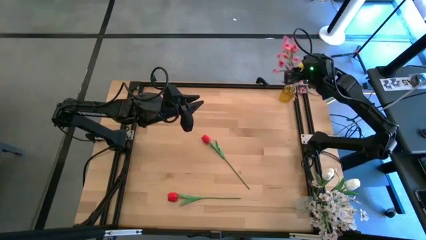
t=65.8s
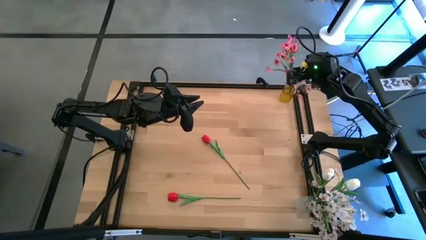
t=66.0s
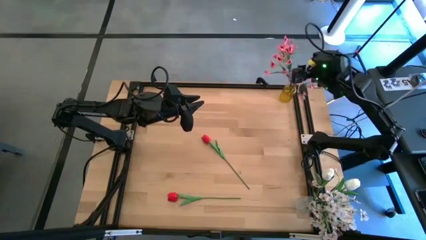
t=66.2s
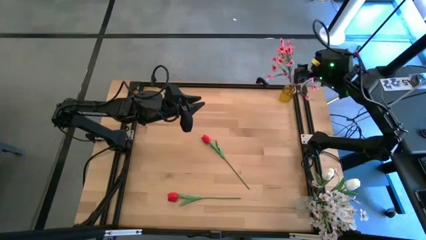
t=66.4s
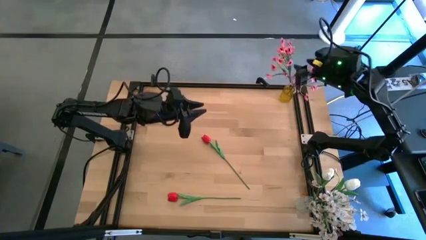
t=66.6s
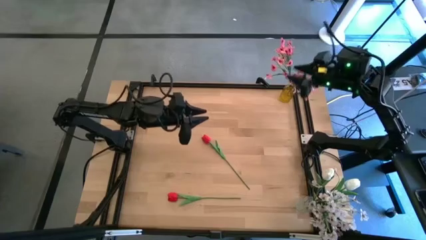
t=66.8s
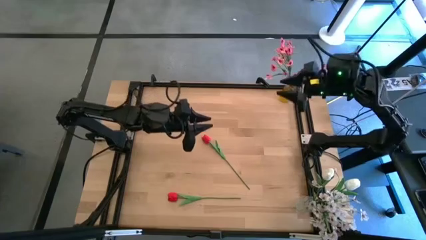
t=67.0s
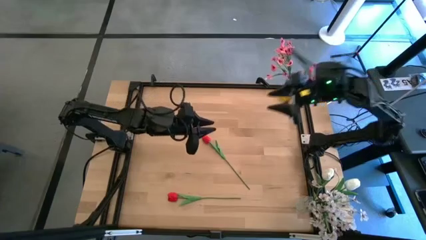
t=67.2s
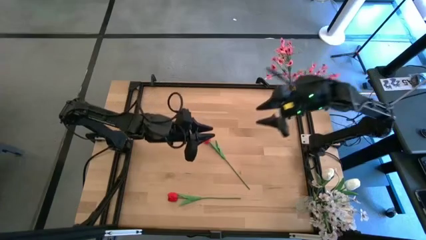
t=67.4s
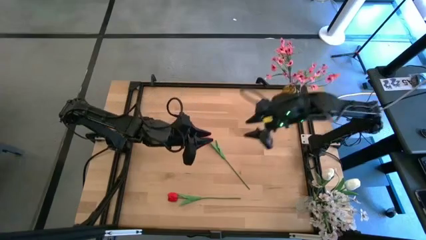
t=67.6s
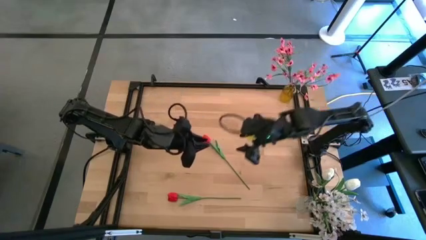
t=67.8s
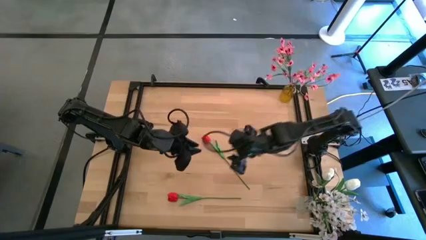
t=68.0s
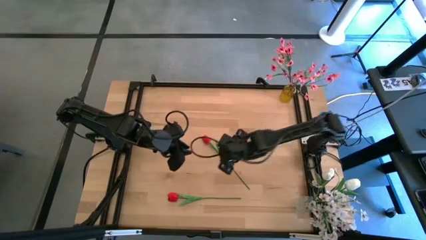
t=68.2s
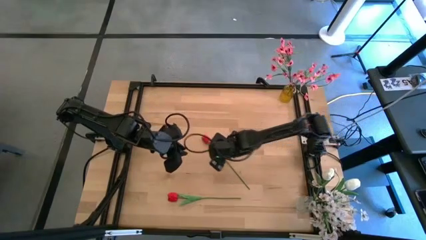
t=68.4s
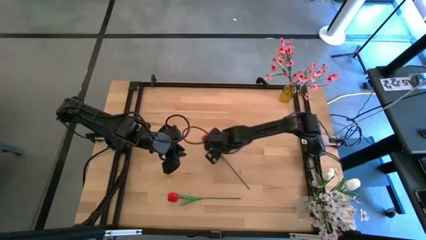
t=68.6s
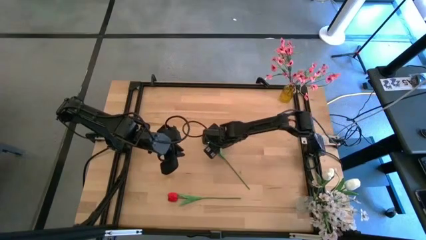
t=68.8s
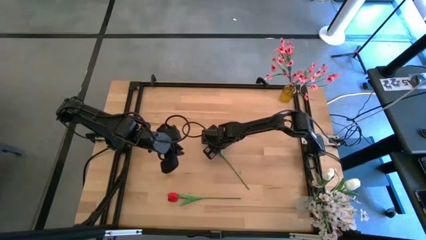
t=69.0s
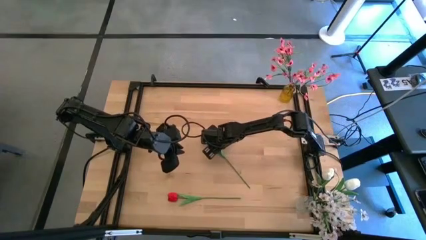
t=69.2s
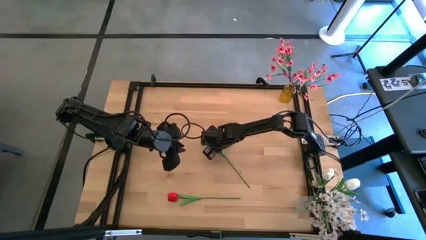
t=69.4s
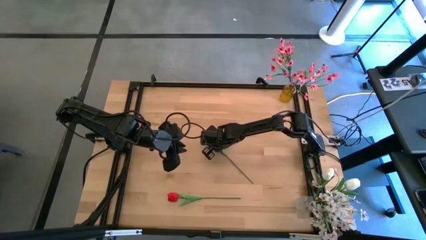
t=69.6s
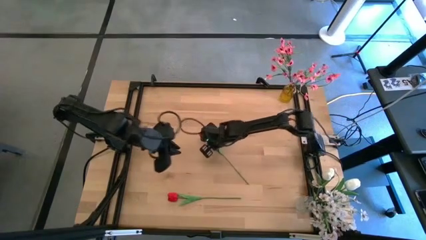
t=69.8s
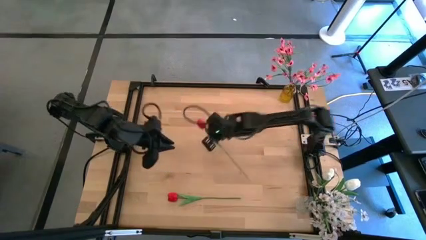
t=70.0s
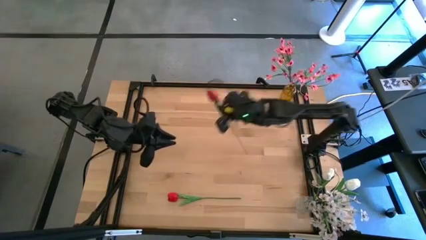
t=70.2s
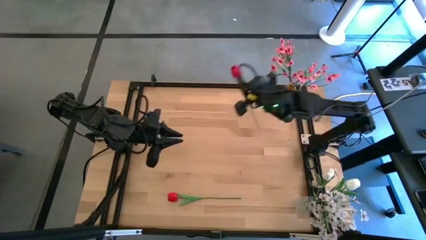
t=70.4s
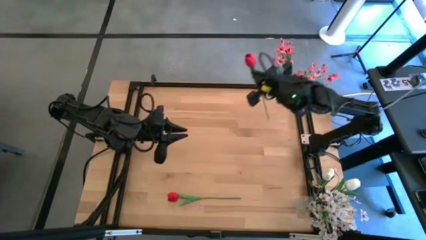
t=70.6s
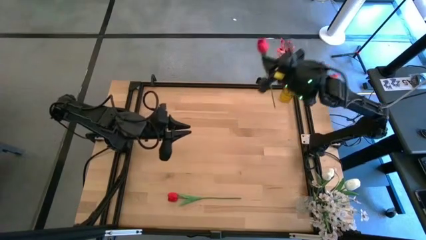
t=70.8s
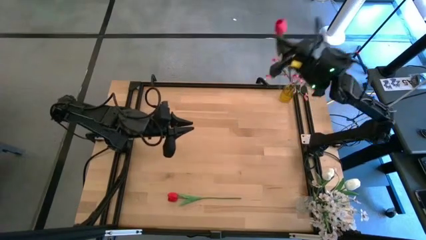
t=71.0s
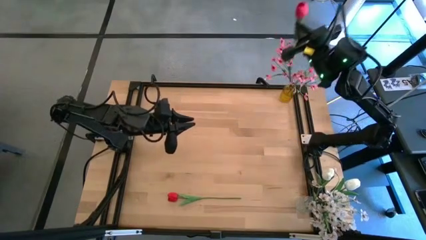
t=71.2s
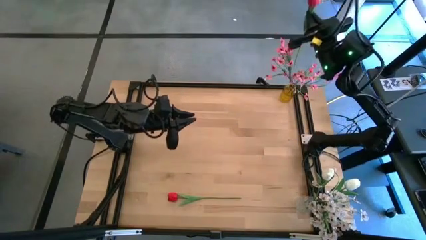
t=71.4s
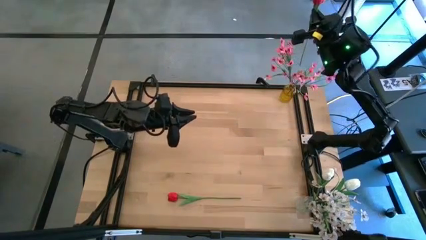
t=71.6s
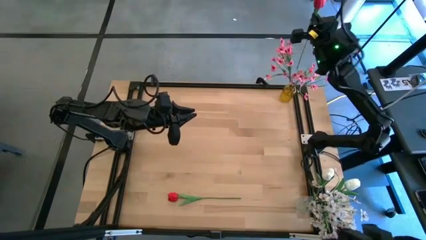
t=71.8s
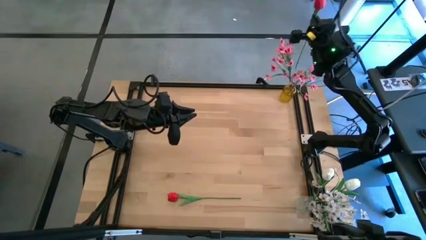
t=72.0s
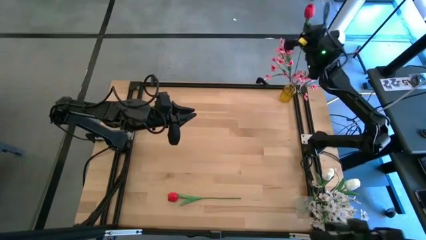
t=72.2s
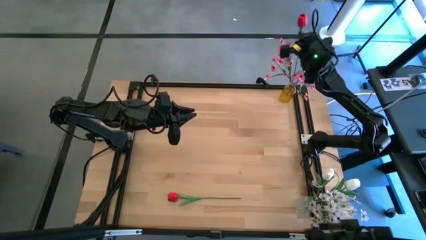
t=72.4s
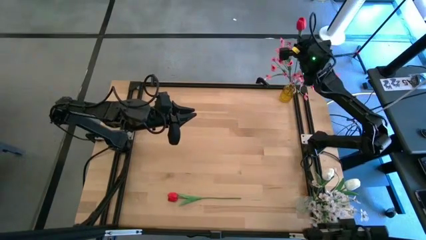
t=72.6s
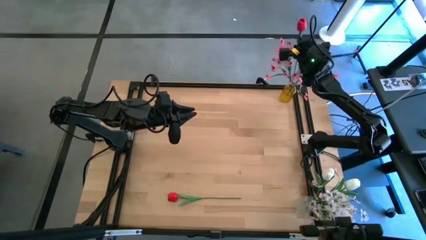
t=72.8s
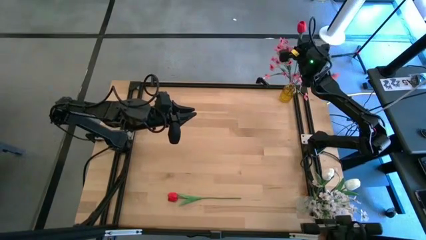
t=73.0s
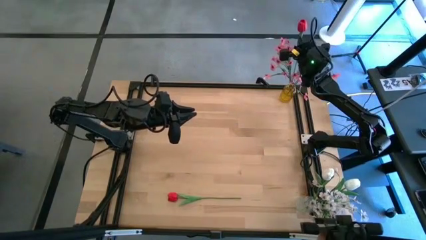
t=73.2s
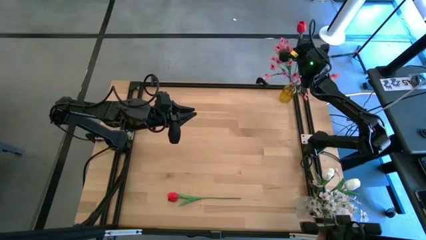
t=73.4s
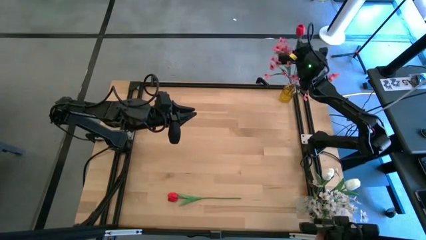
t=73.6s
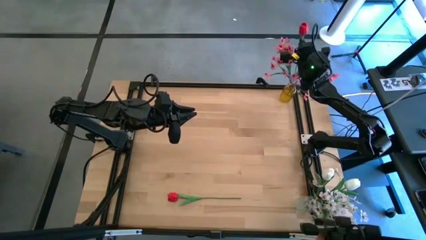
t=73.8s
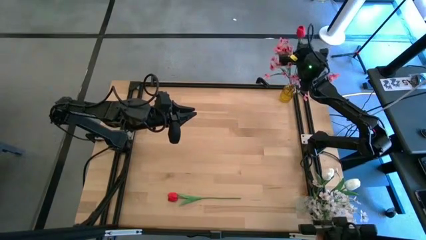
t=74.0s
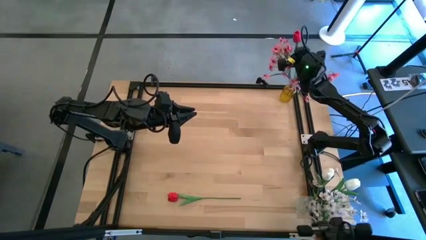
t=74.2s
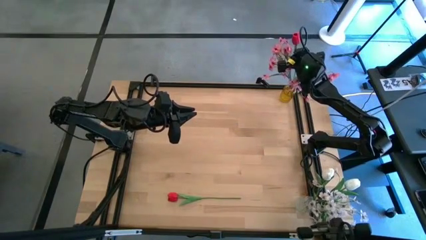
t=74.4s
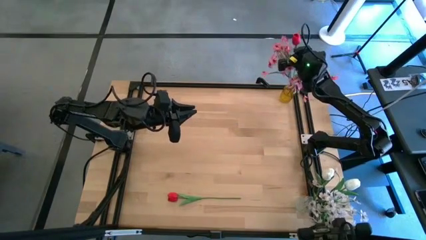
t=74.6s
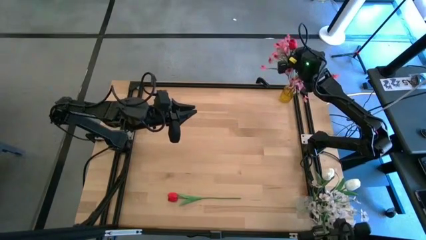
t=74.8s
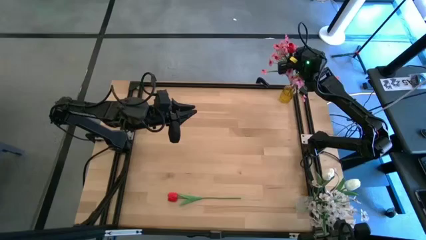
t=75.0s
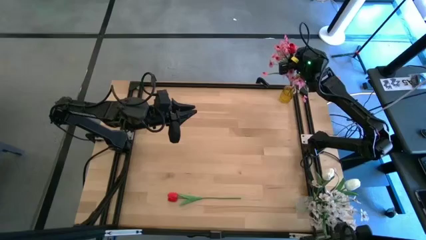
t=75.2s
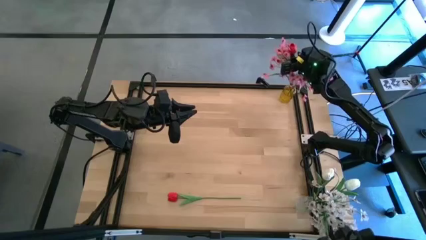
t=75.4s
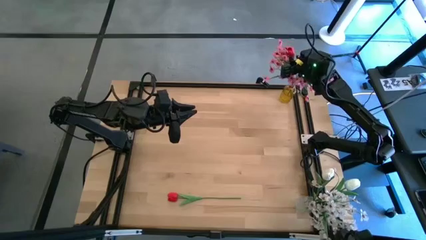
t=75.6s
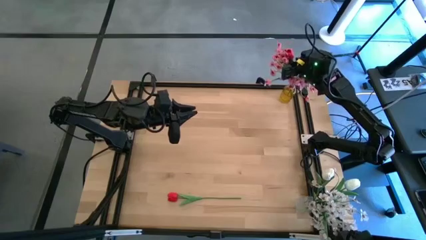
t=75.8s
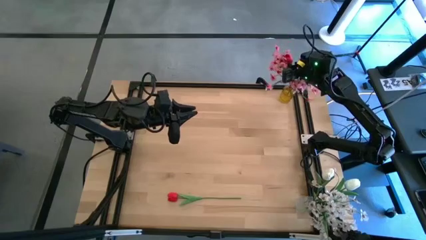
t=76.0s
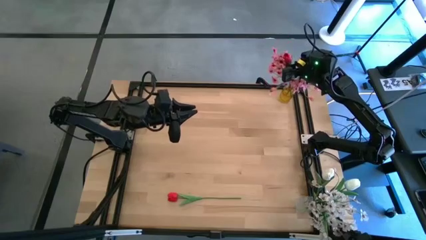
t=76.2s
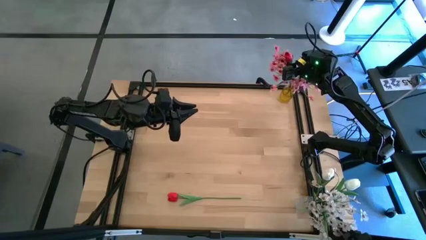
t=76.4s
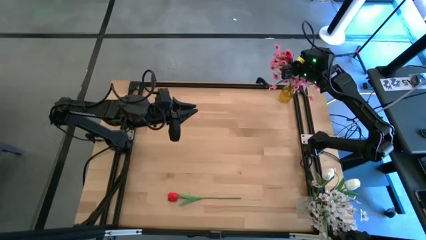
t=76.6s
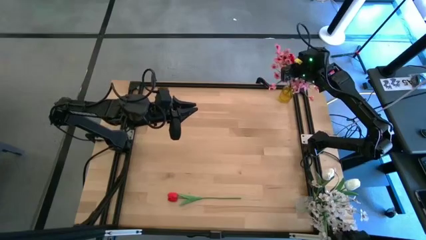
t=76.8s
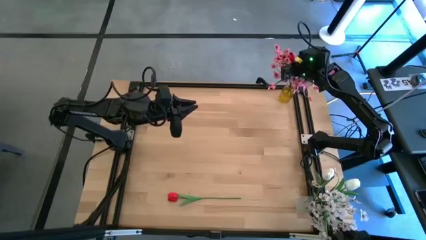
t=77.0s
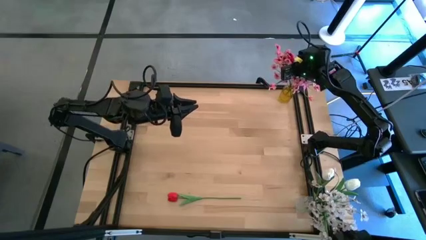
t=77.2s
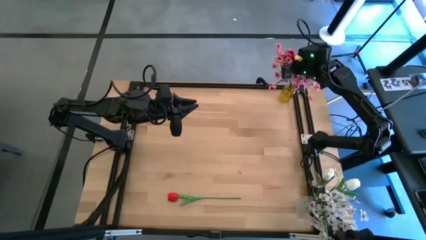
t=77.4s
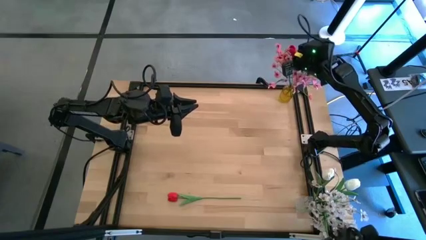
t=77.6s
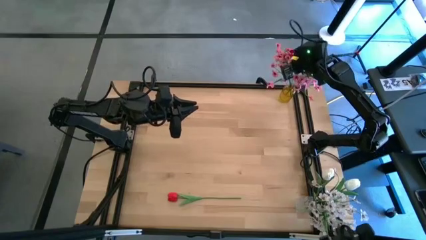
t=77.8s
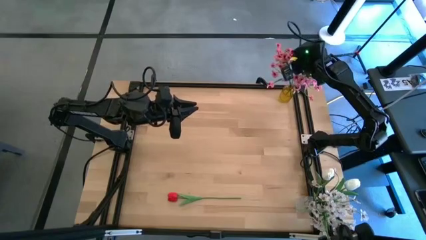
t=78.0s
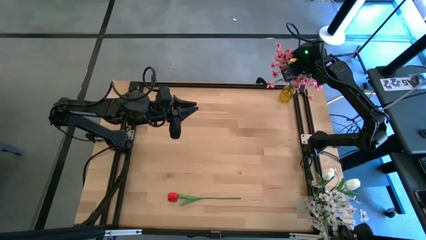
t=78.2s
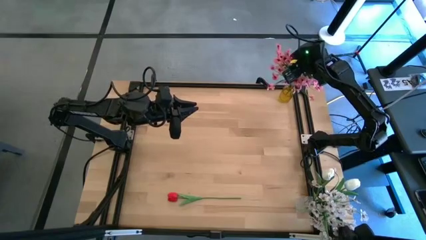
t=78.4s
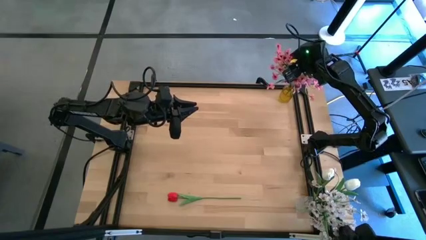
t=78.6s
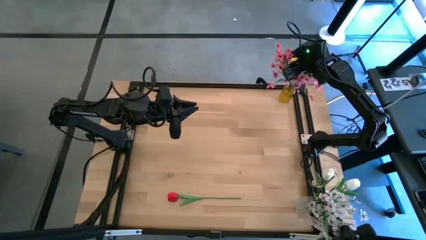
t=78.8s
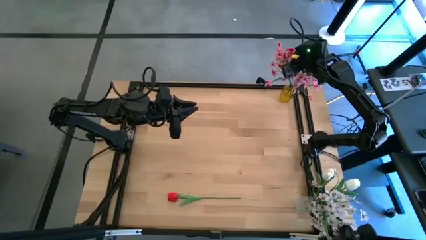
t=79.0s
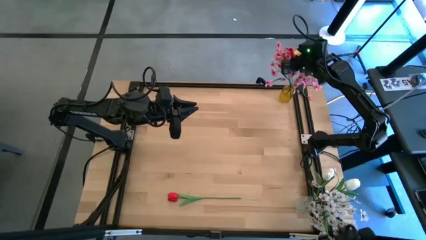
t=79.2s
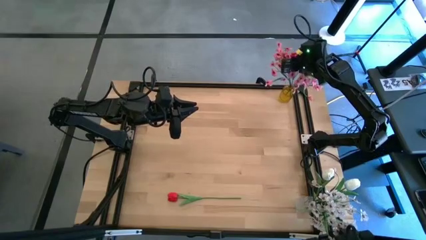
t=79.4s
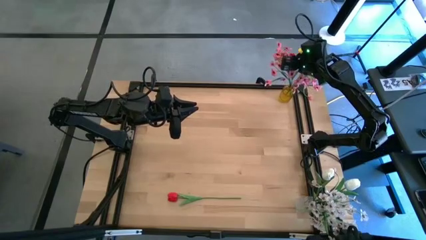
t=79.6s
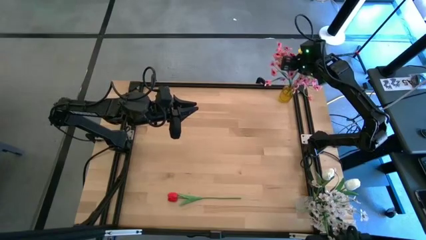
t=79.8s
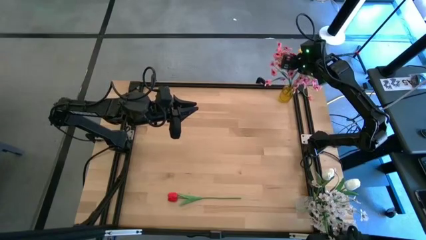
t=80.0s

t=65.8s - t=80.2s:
Task: Sort flowers into vase by color
Put the top red flower into the yellow vase
